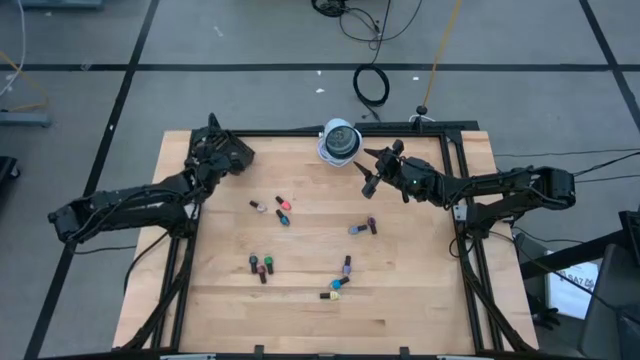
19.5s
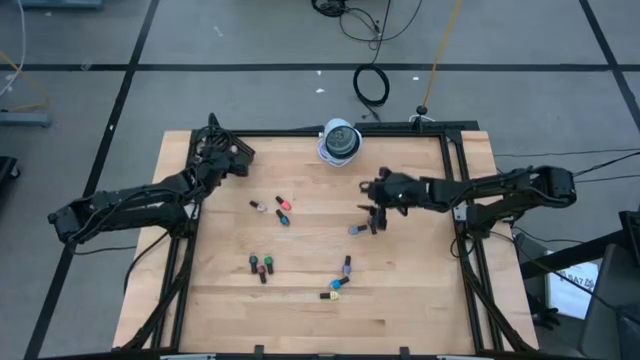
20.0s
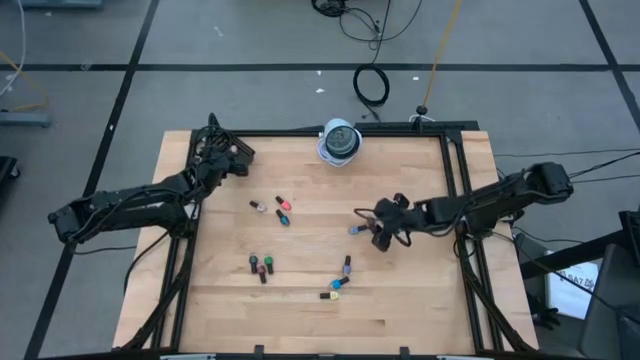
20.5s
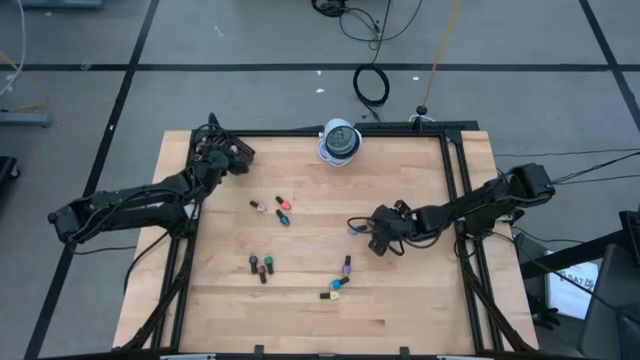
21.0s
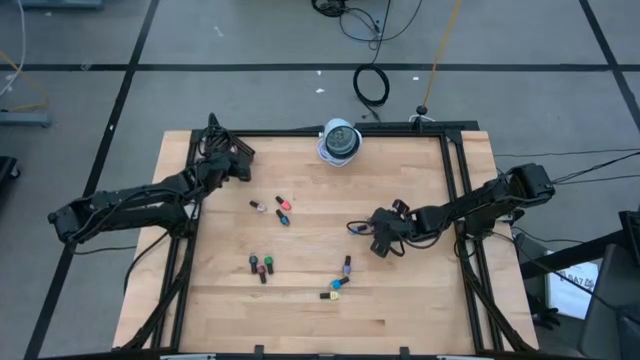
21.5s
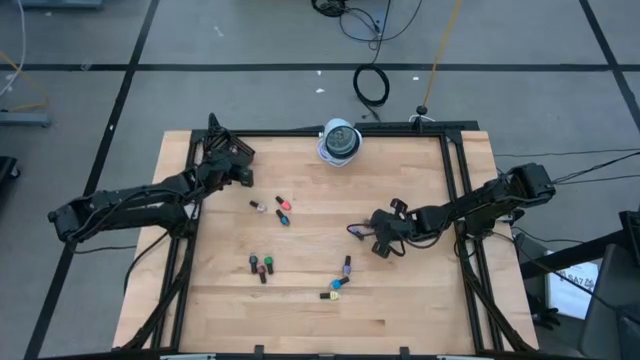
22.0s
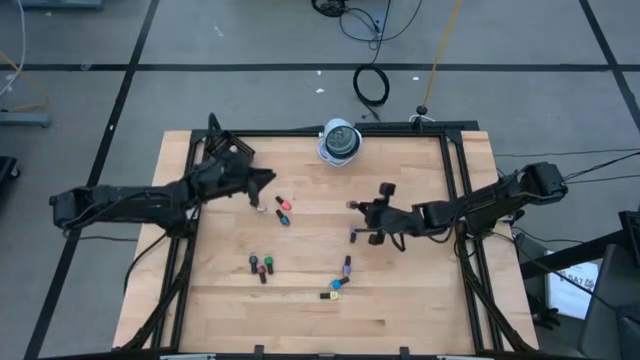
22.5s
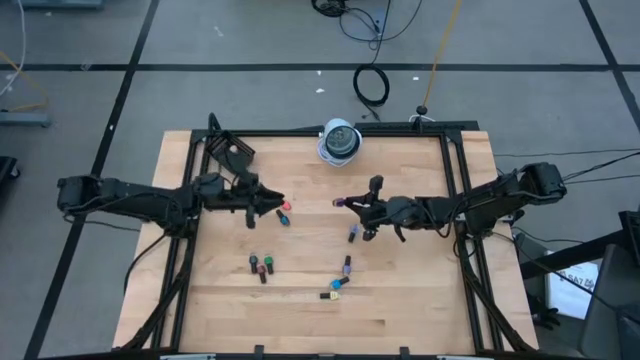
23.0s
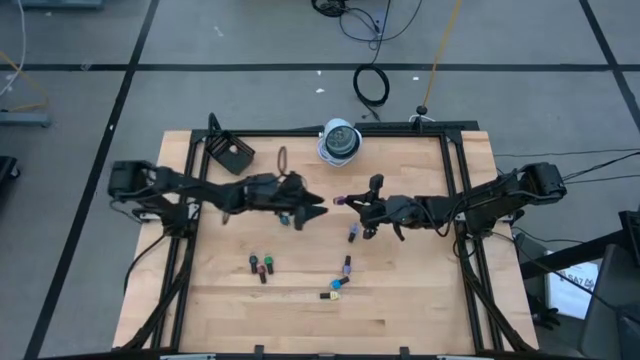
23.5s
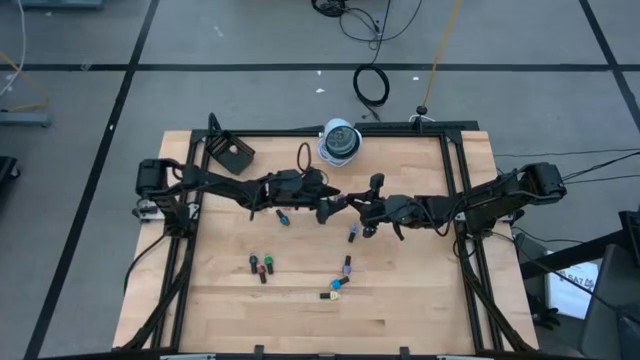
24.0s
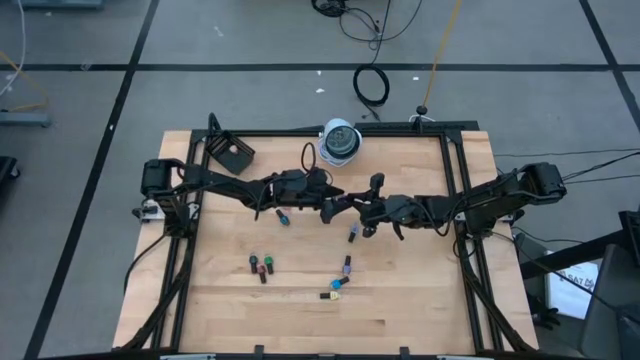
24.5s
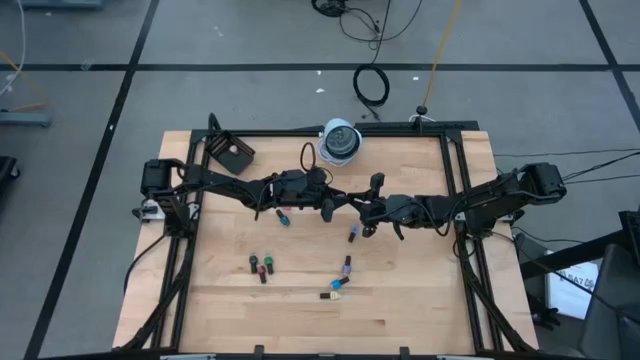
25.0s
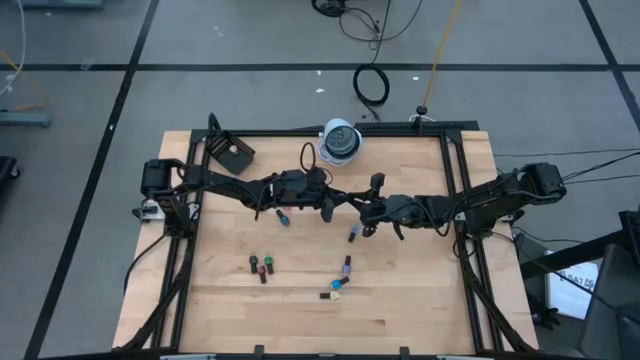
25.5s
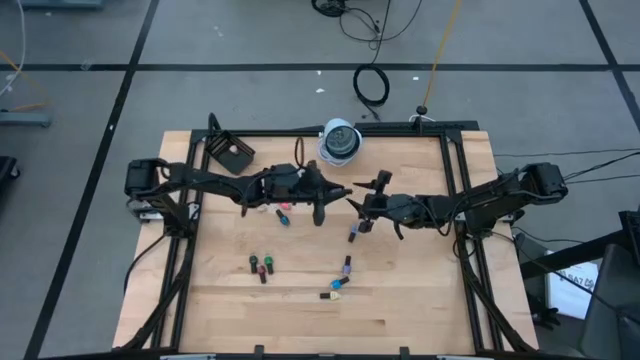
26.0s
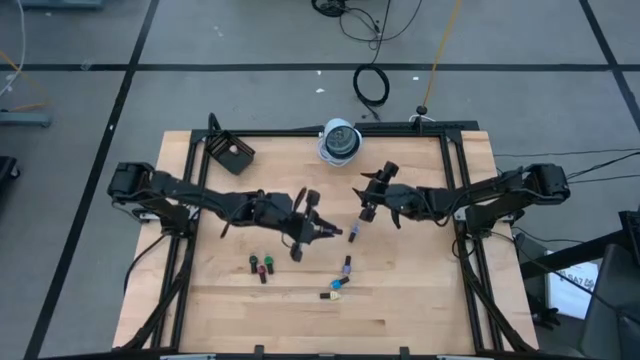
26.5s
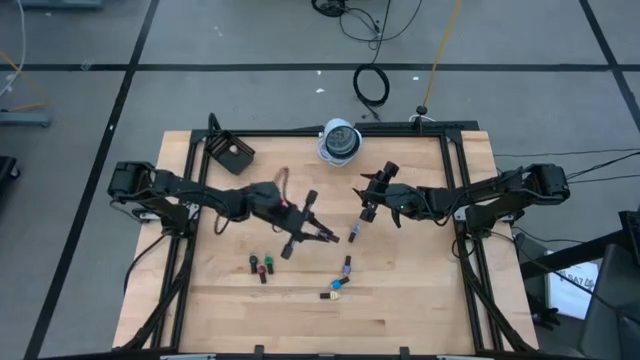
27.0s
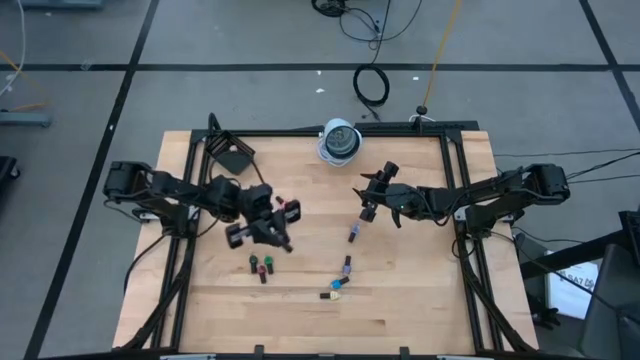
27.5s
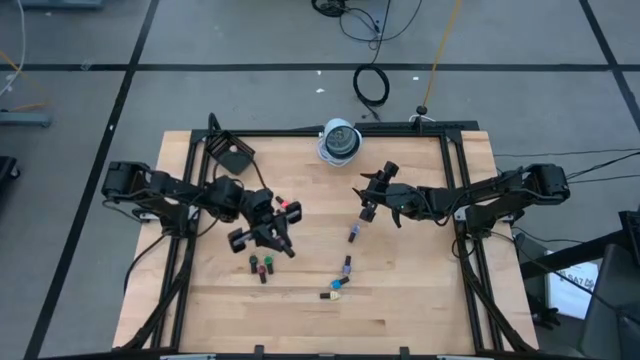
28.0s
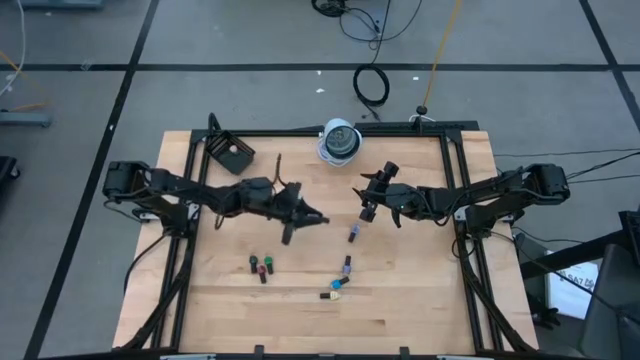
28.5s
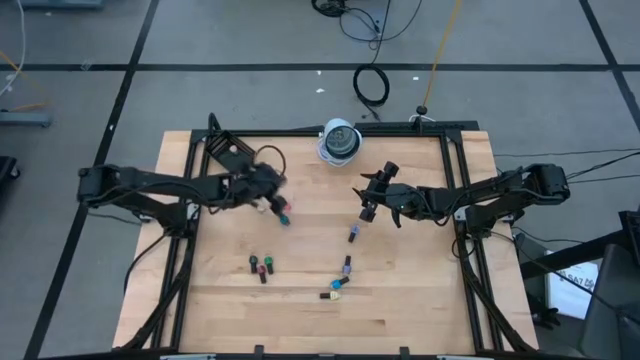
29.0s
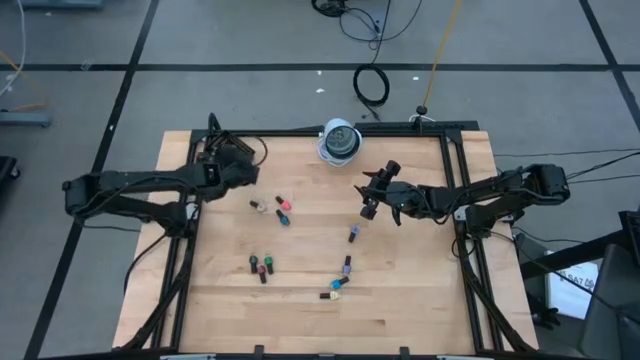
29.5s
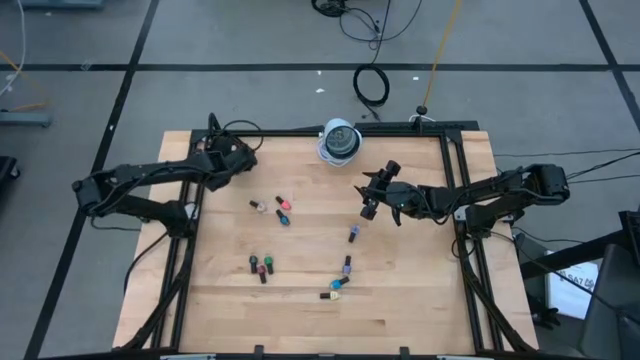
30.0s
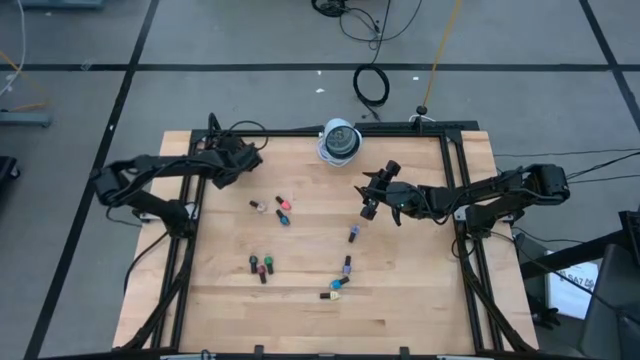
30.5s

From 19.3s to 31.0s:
Task: Pick & Place Nail Polish
Put the violet nail polish bottle into the black basket

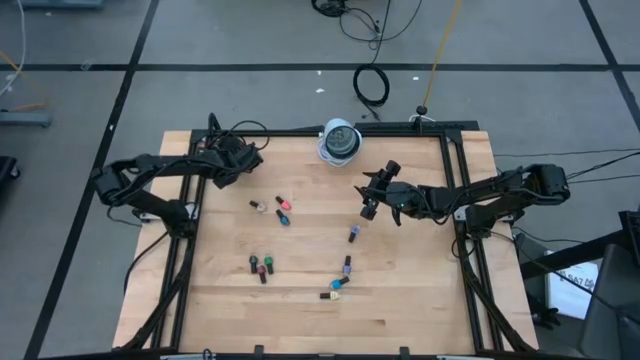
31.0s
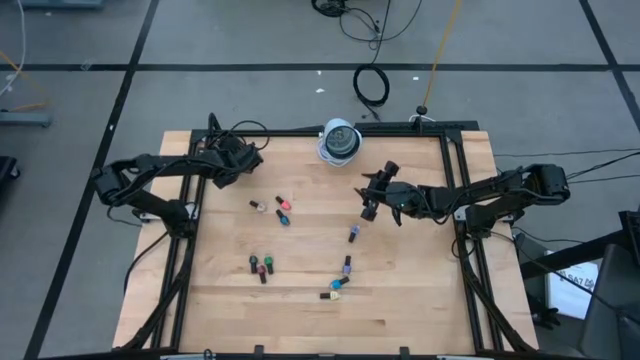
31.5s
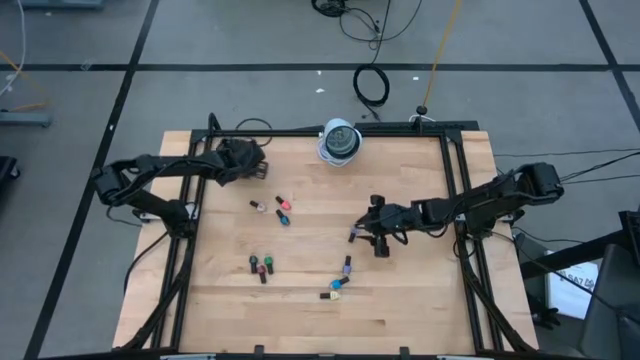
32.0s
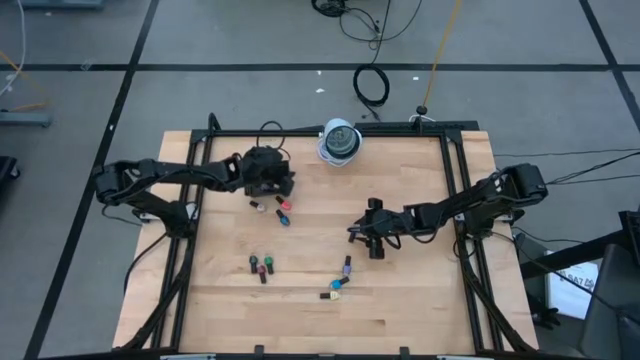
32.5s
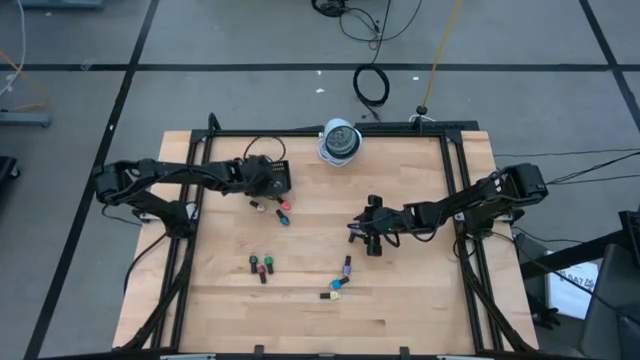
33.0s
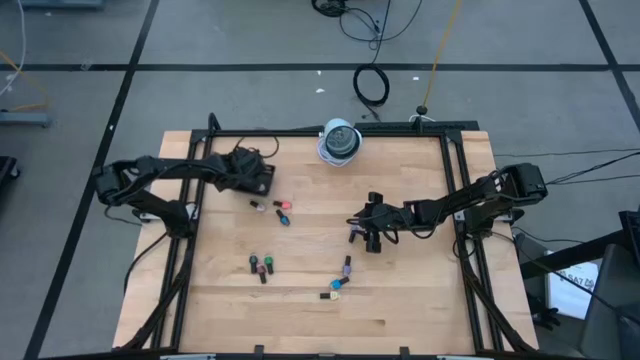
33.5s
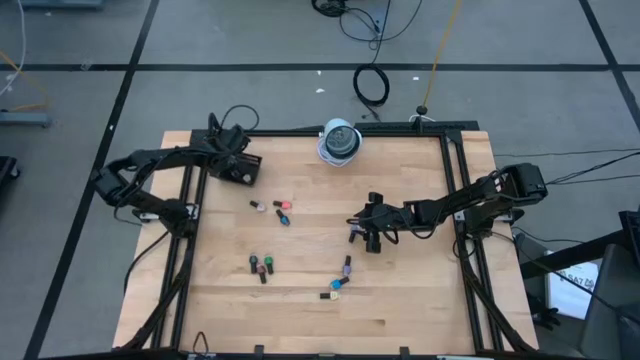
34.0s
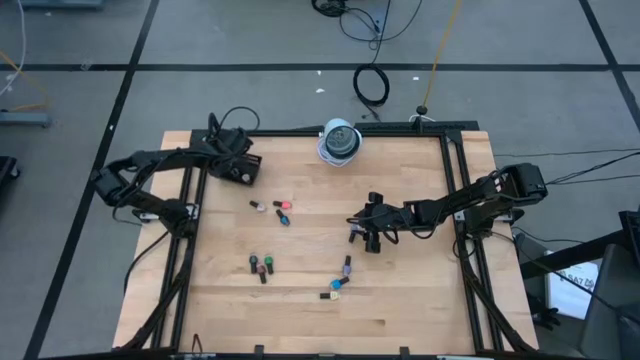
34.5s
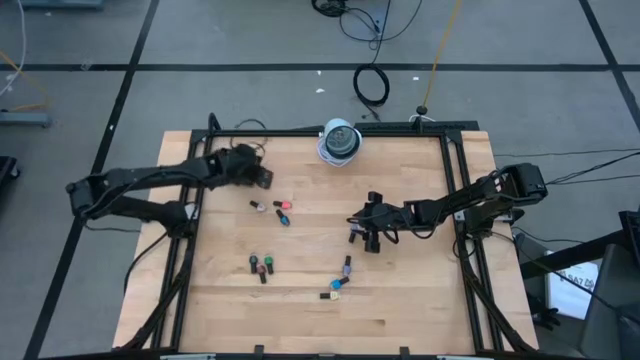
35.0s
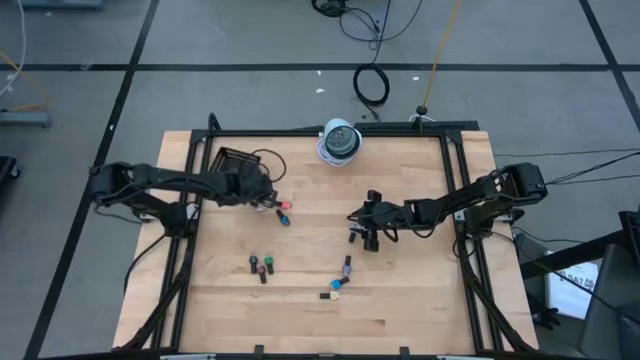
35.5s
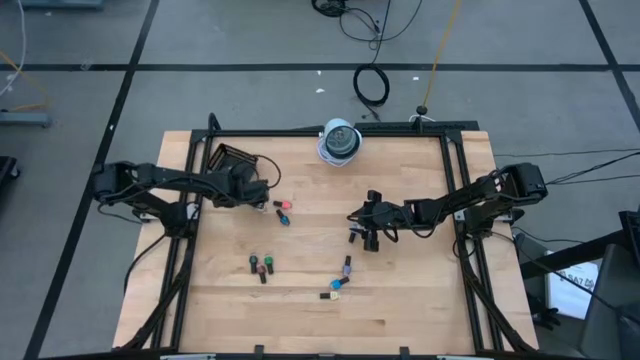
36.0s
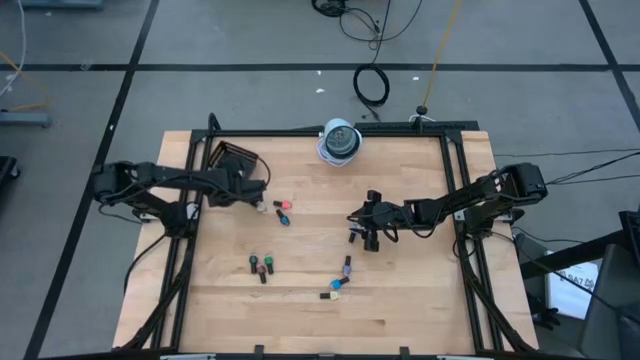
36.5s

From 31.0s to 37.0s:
Adjust the black basket

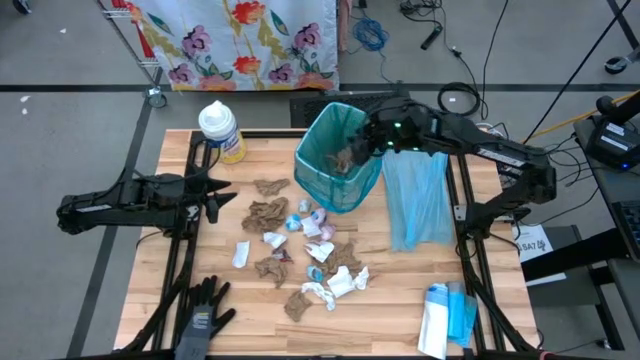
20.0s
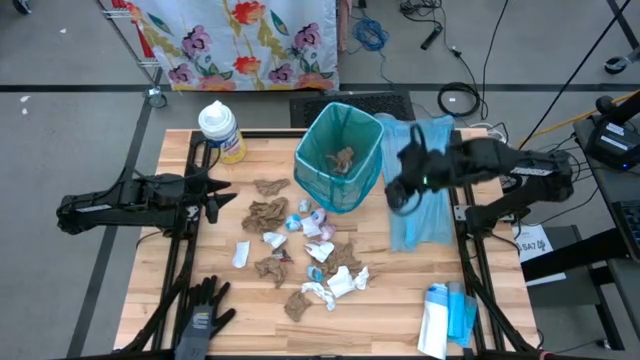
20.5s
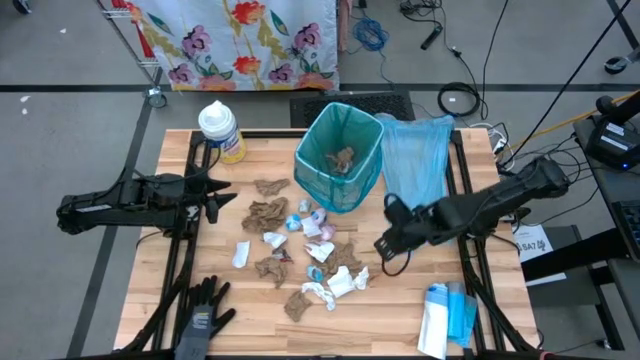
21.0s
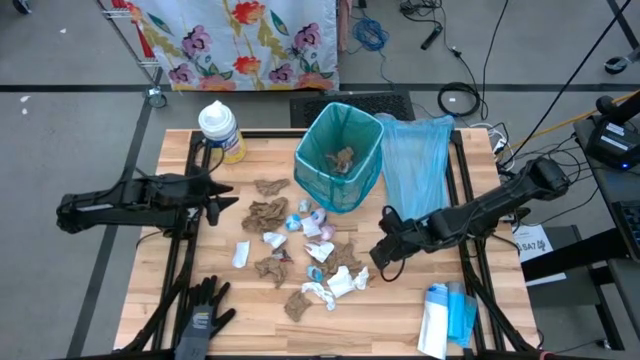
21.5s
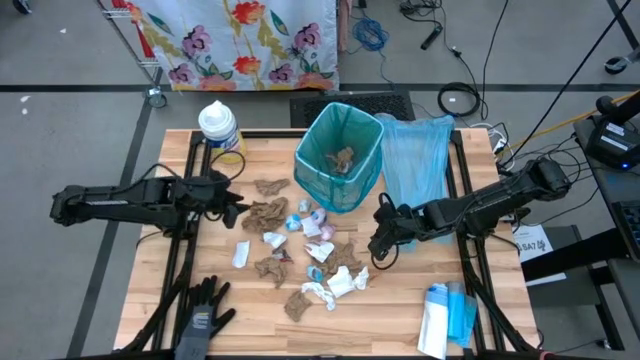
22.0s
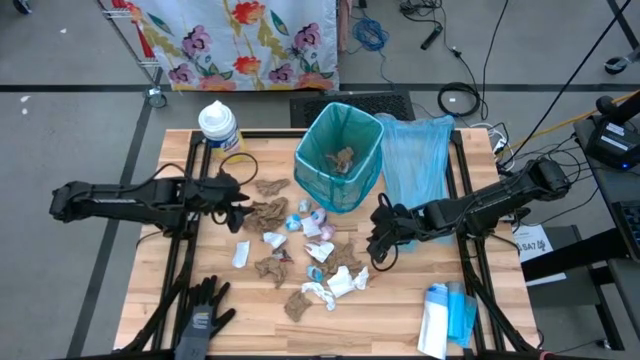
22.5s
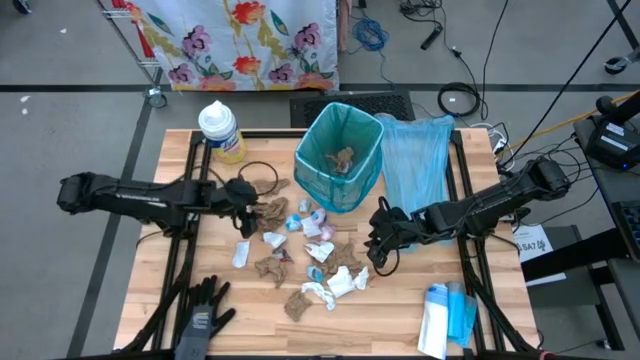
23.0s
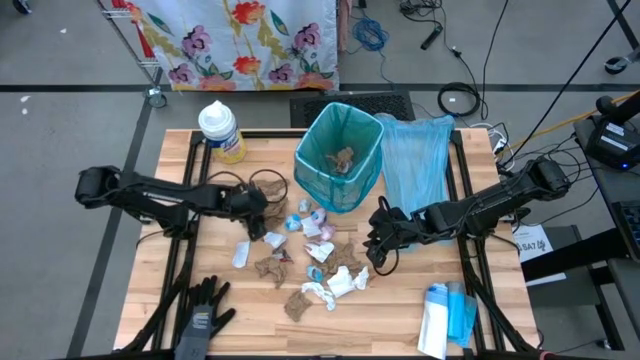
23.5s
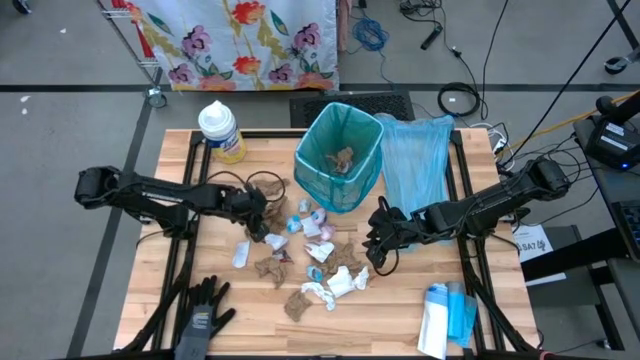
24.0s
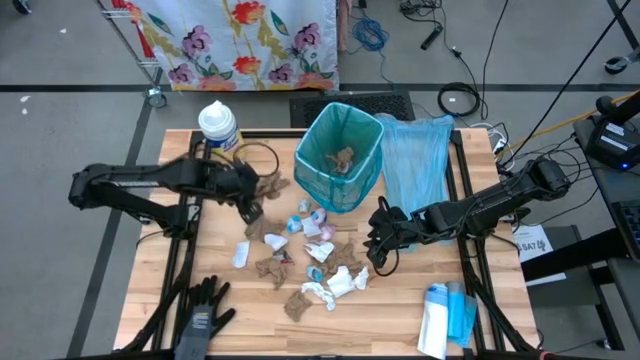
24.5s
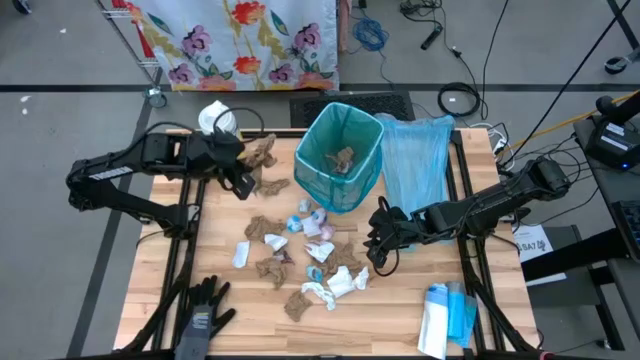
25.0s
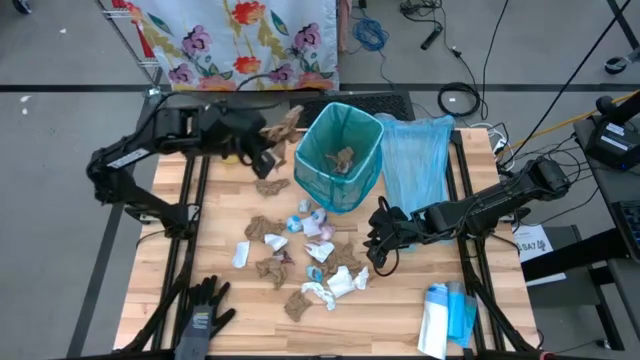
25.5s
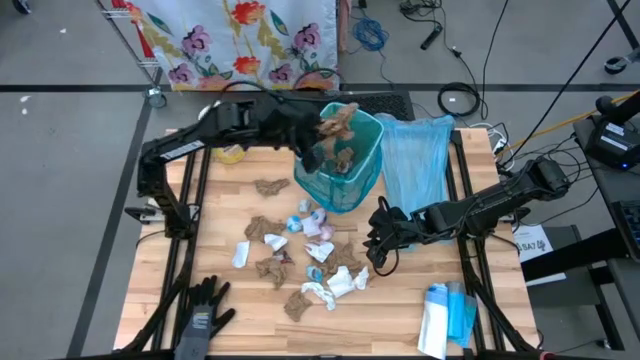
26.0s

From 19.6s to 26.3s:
Task: place trash/remove bag and relplace
Put the brown napkin into the trash bin
